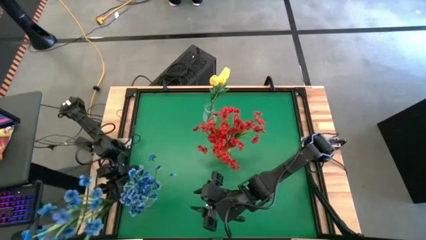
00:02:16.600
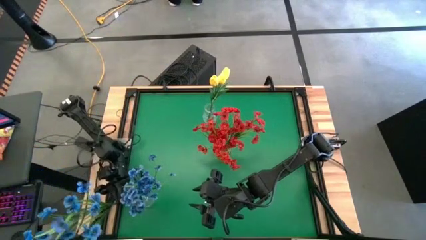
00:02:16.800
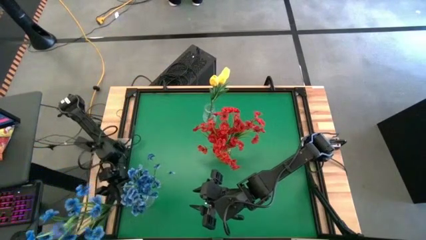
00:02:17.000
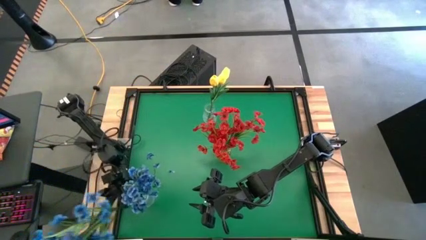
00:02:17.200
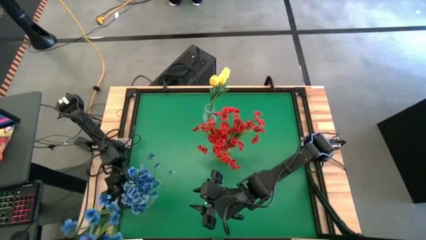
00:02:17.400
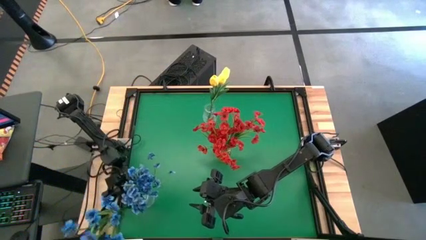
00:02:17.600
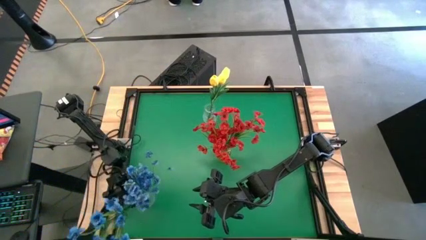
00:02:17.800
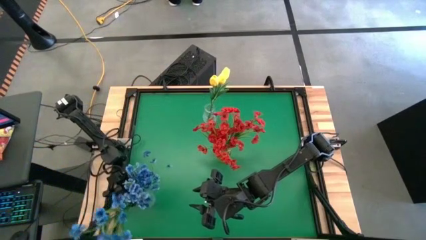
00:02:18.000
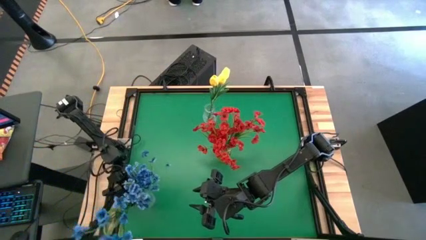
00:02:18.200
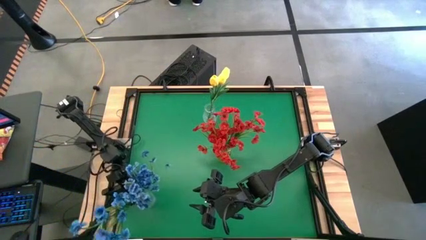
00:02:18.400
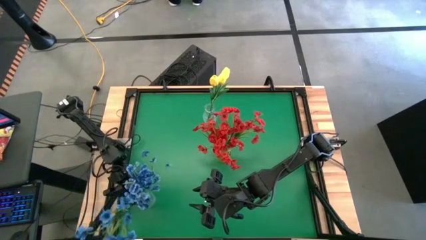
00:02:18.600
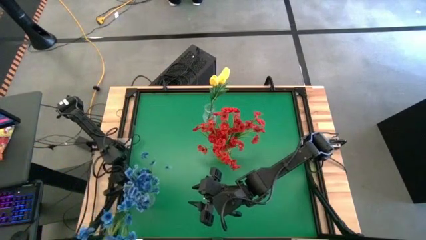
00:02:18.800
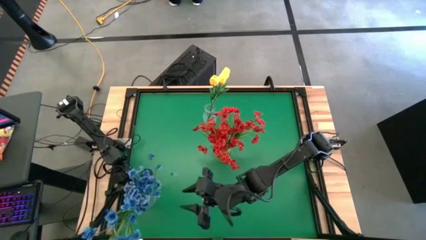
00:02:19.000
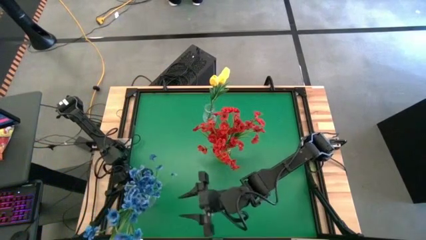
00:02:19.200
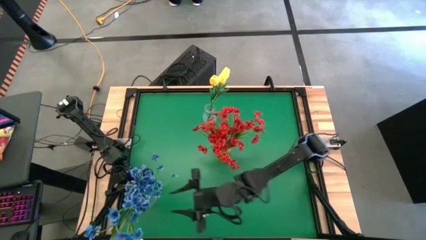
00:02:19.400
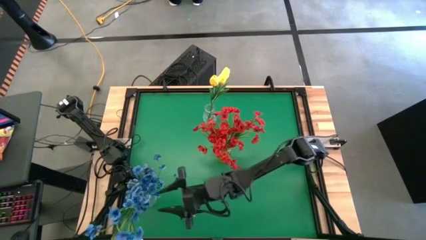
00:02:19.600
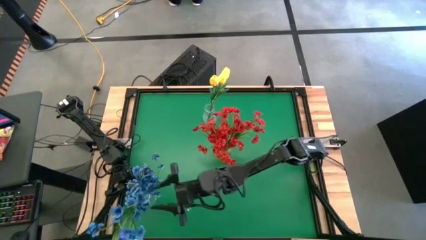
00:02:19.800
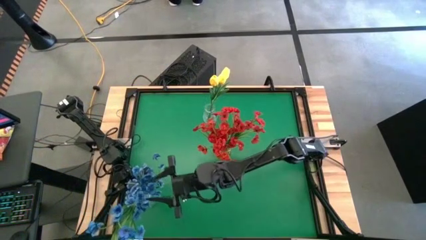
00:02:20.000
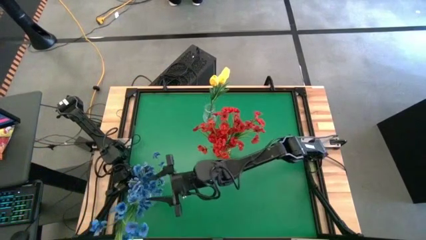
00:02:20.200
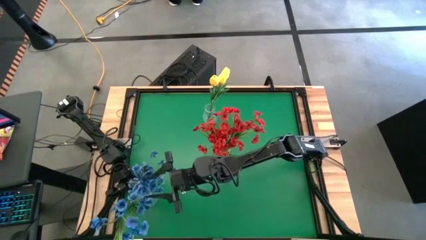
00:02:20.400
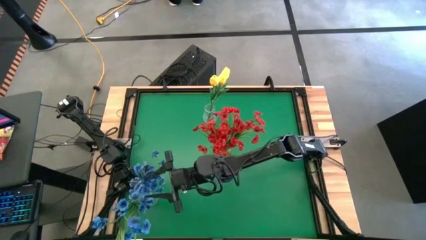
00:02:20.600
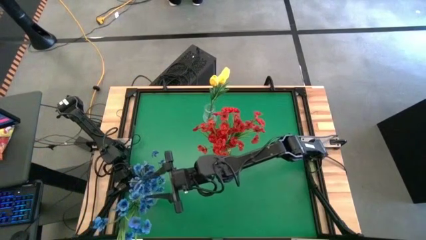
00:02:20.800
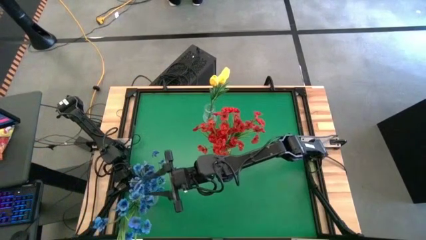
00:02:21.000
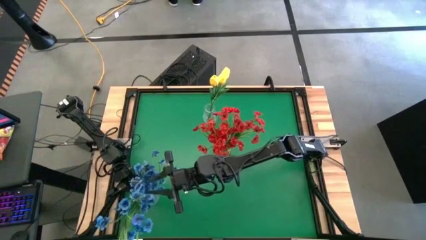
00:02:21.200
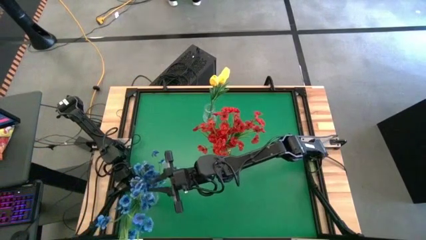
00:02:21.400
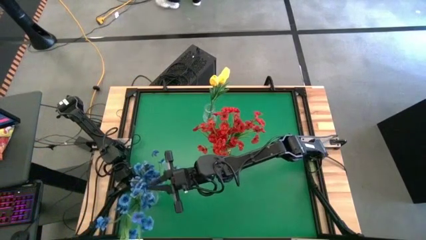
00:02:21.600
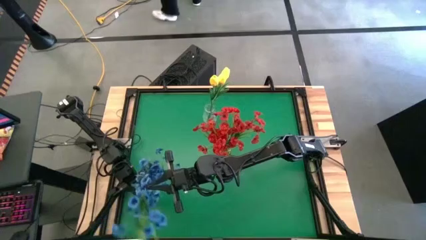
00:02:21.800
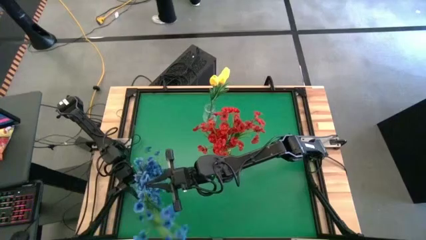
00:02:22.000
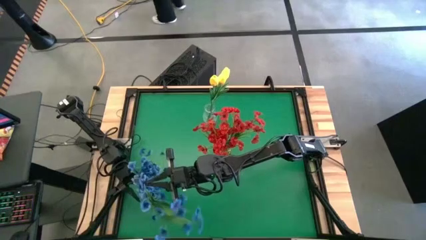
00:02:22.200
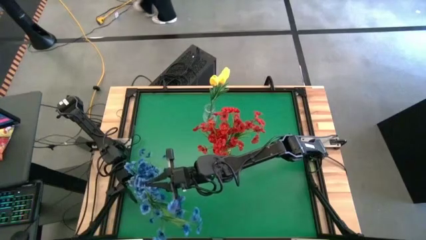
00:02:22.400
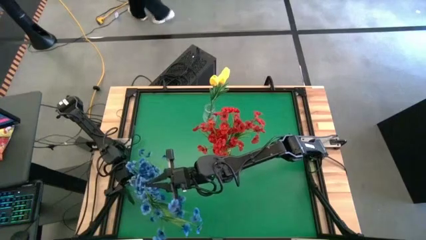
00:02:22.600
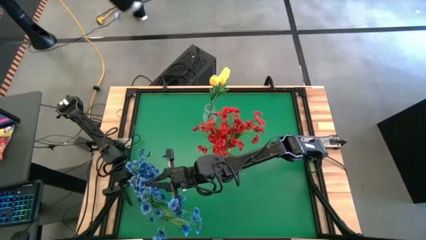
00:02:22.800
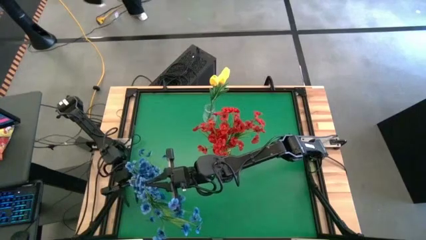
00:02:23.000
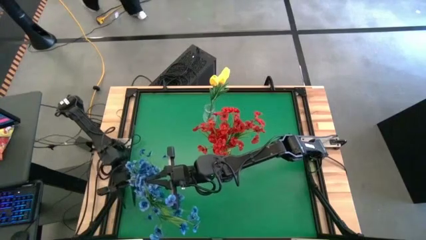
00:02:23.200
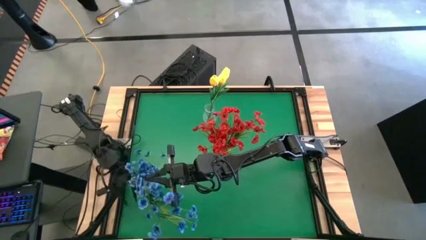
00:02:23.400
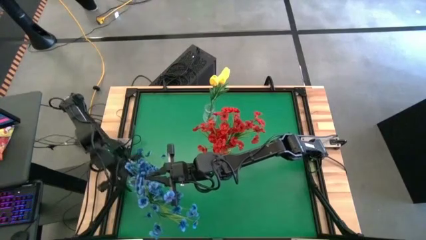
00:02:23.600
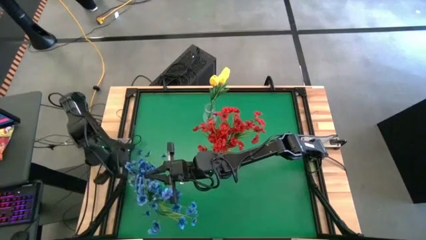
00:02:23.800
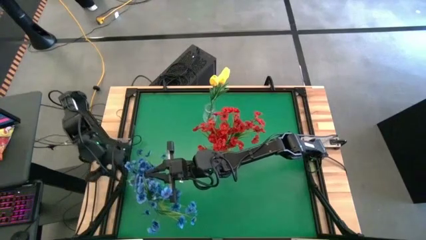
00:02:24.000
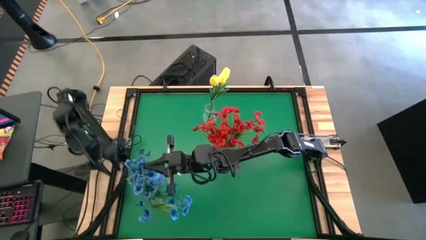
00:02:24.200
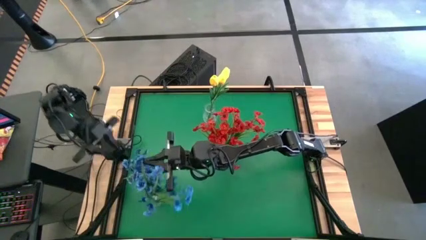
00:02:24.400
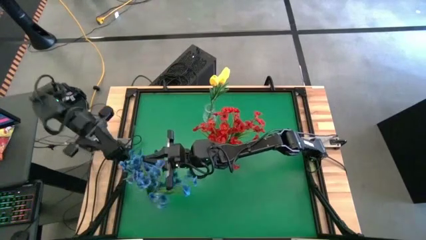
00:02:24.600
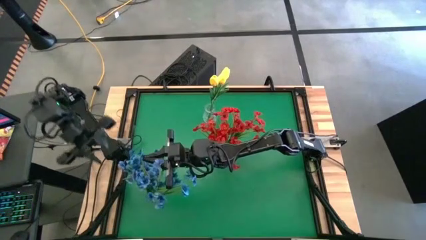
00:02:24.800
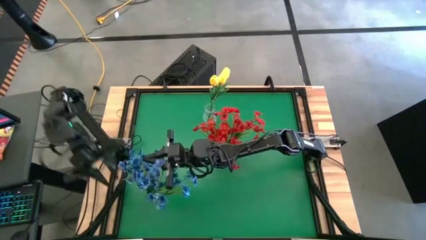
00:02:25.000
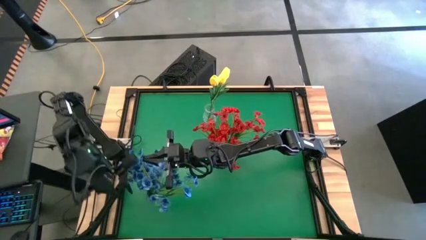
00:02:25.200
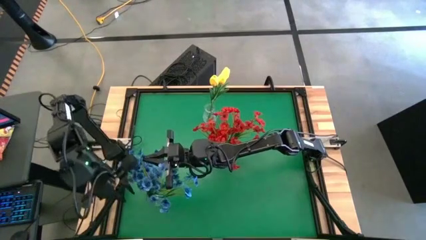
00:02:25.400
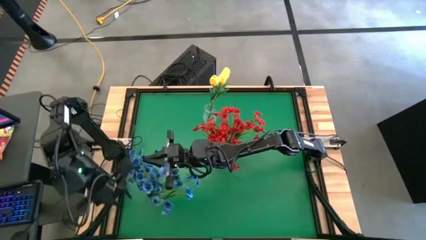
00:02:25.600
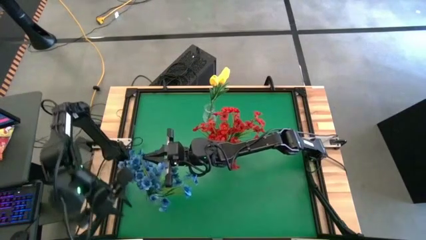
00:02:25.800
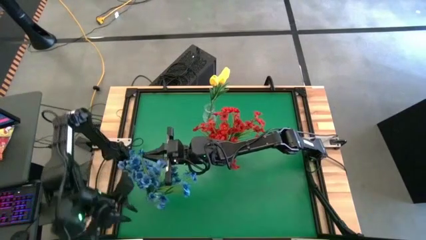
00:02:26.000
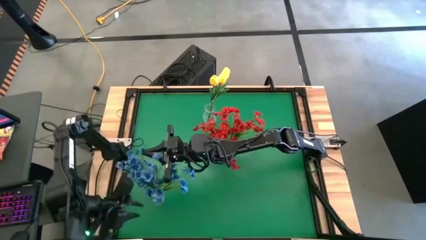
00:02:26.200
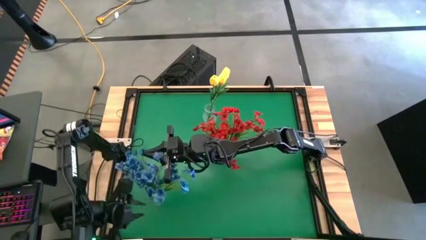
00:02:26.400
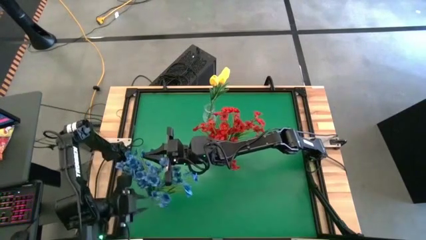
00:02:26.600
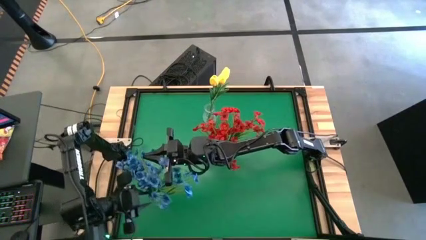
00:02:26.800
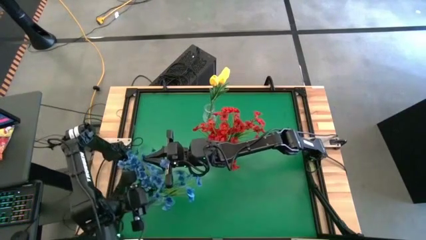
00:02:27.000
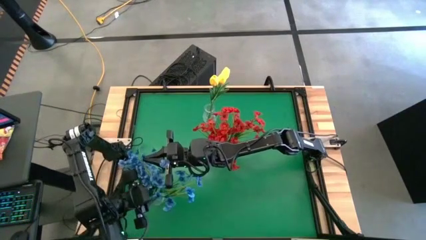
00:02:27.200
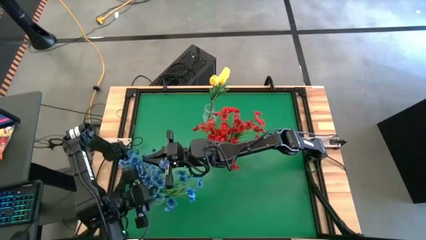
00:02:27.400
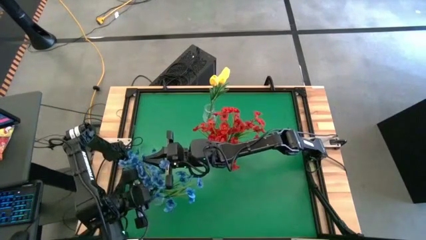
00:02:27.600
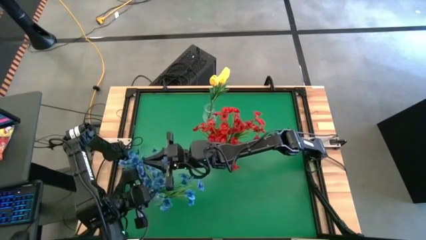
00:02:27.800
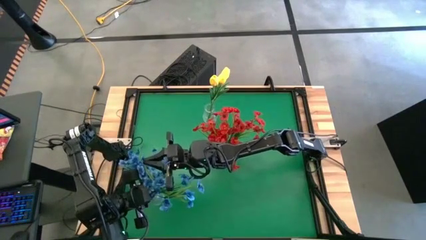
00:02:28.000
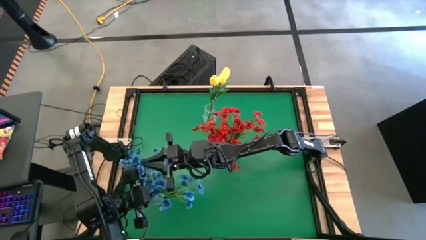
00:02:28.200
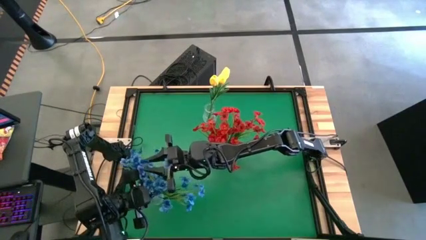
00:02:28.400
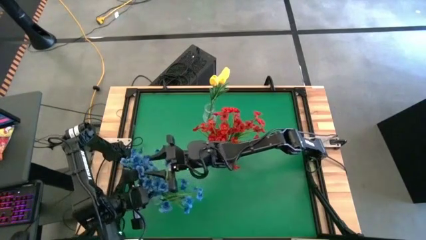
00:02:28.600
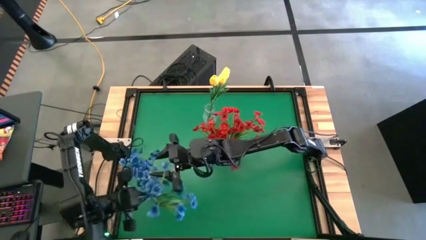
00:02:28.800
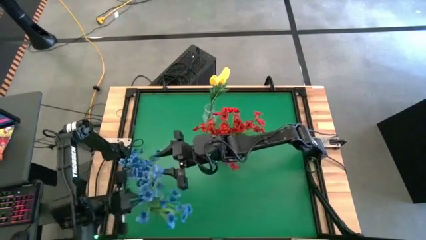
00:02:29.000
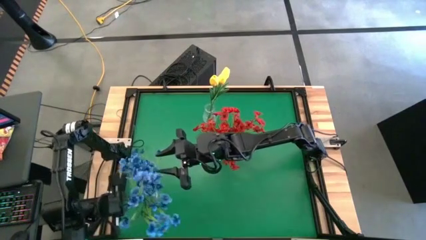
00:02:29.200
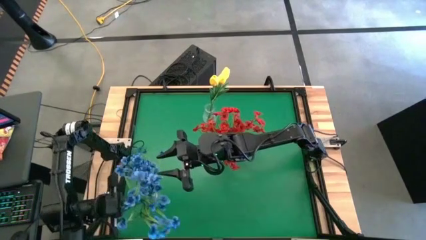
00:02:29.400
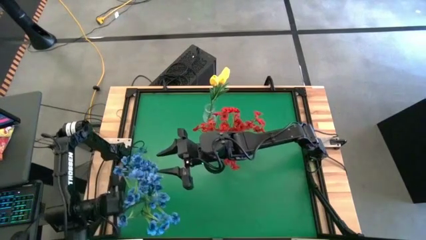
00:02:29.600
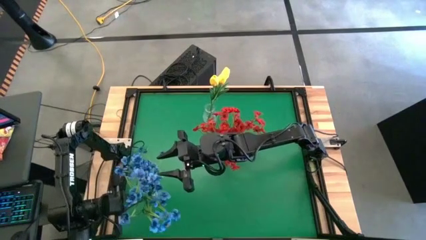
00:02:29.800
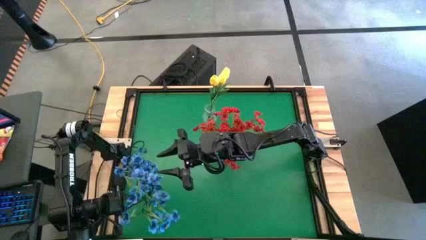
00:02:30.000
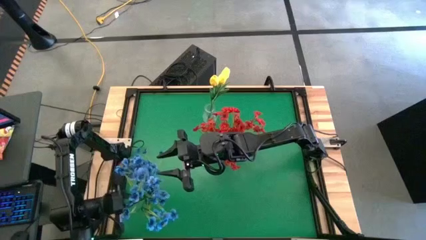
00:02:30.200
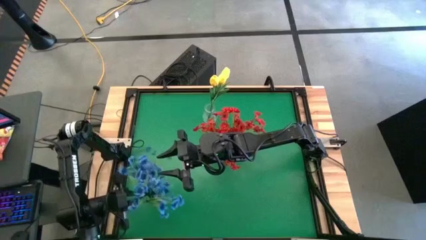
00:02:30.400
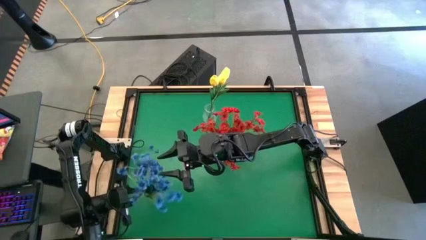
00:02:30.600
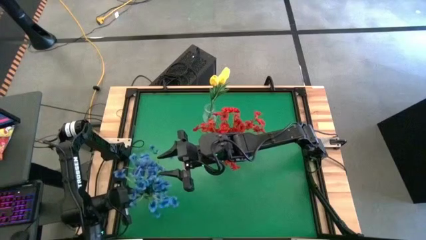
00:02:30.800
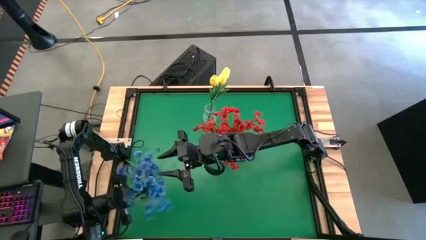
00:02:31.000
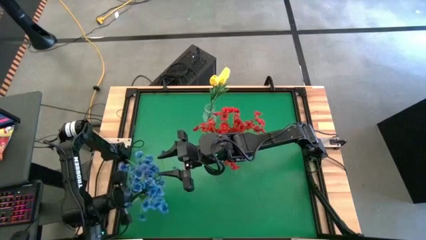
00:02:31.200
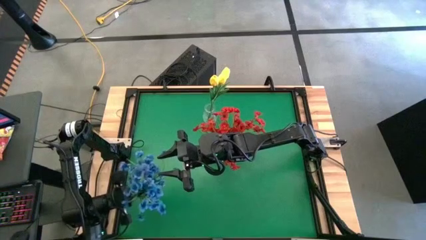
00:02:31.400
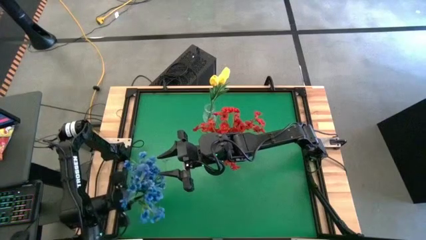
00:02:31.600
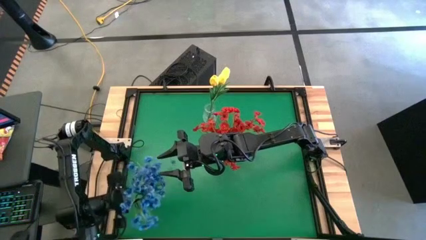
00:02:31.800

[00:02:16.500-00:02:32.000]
Task: Sort flowers into vase by color
Put the blue flowers into the bottom transparent vase
